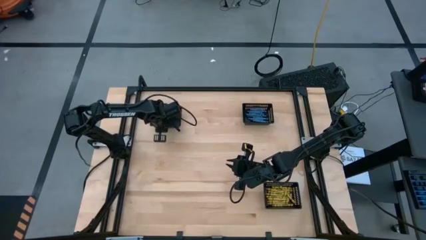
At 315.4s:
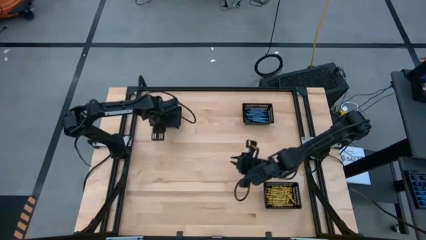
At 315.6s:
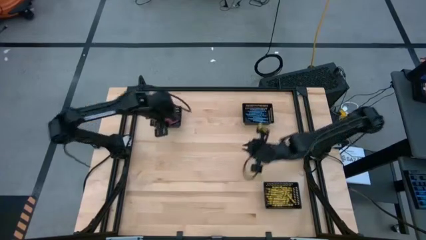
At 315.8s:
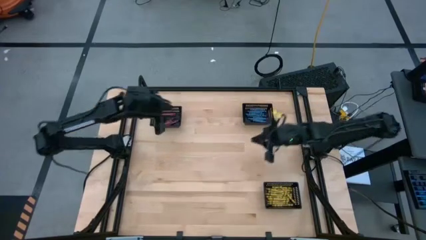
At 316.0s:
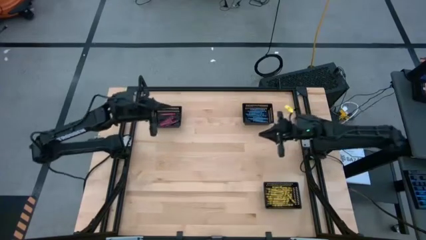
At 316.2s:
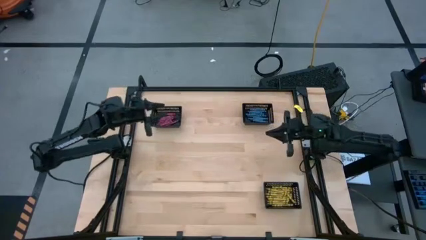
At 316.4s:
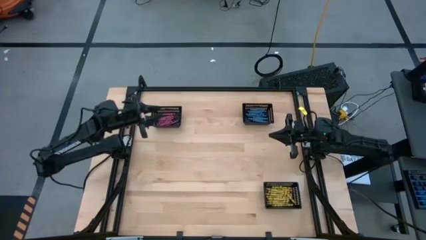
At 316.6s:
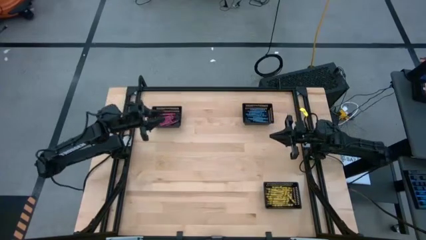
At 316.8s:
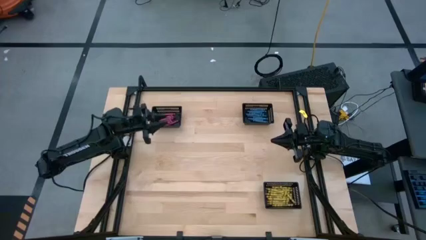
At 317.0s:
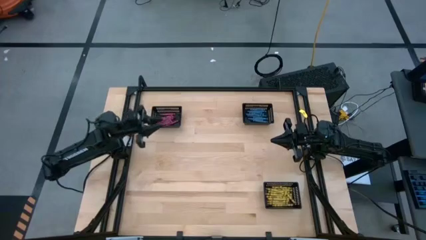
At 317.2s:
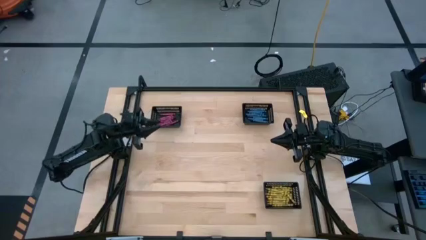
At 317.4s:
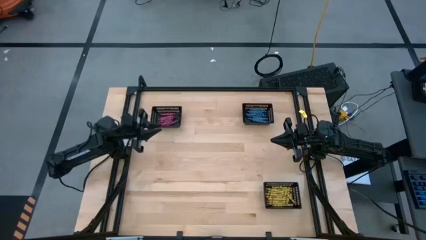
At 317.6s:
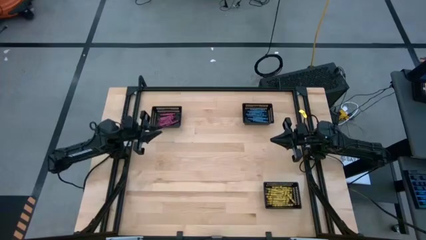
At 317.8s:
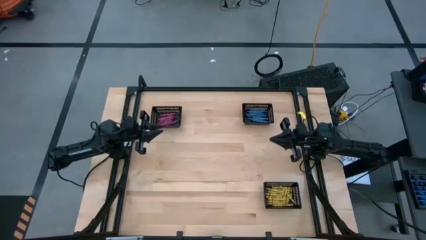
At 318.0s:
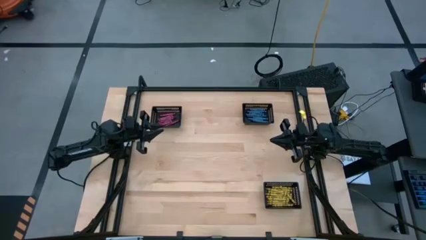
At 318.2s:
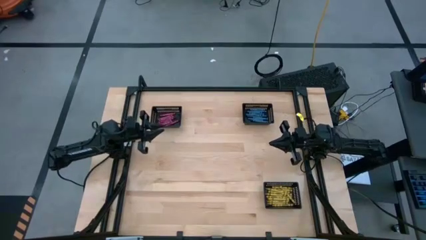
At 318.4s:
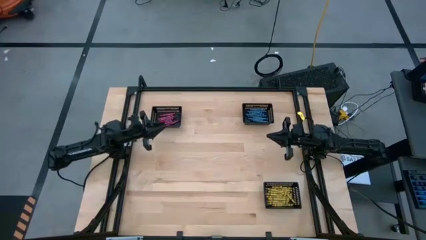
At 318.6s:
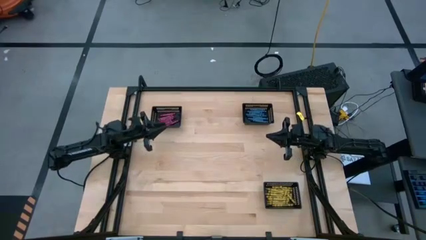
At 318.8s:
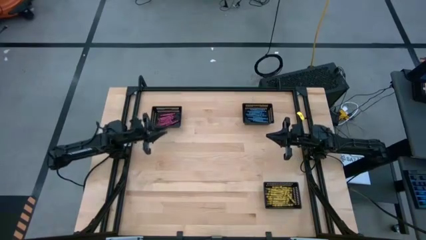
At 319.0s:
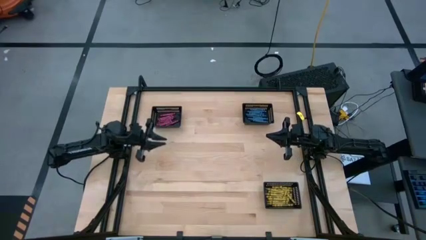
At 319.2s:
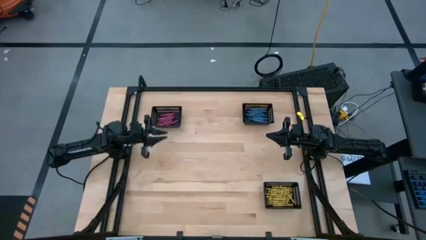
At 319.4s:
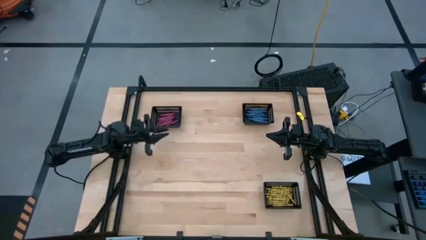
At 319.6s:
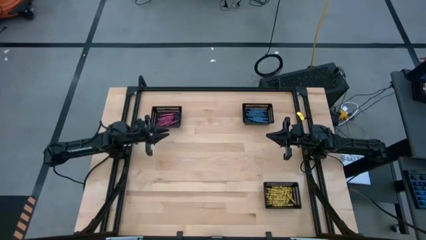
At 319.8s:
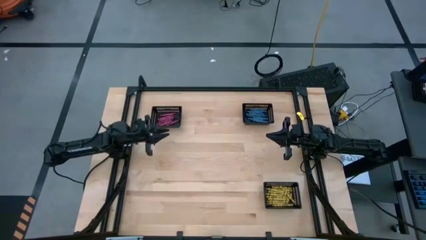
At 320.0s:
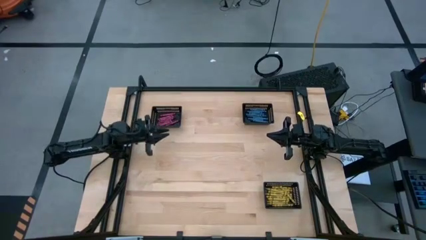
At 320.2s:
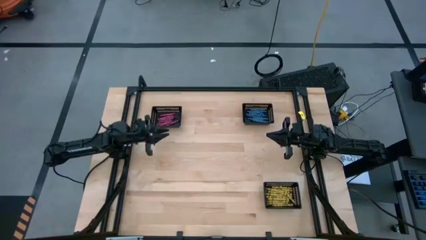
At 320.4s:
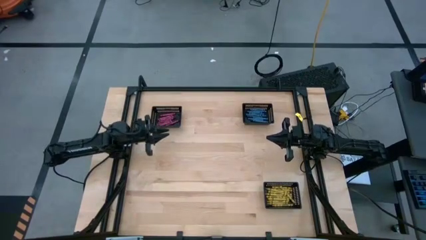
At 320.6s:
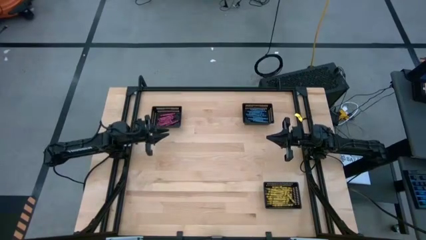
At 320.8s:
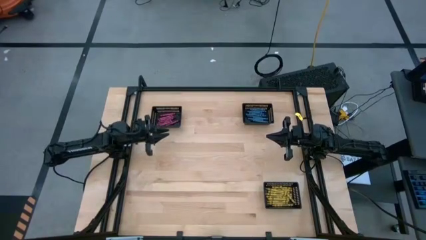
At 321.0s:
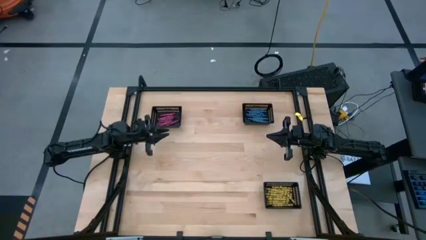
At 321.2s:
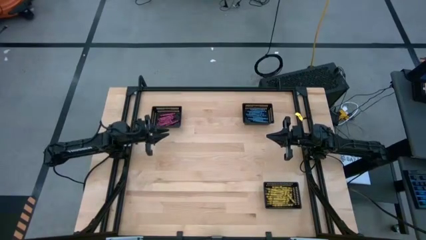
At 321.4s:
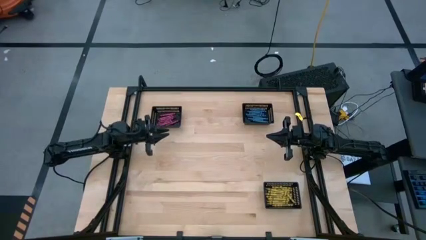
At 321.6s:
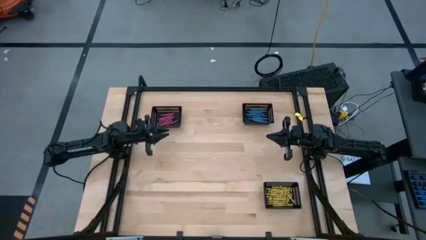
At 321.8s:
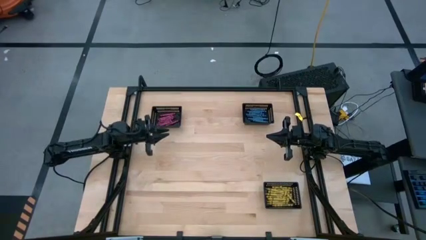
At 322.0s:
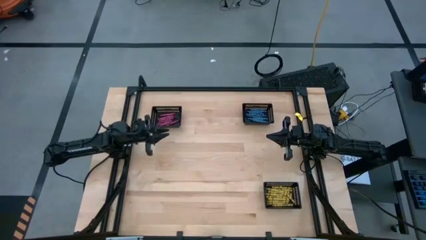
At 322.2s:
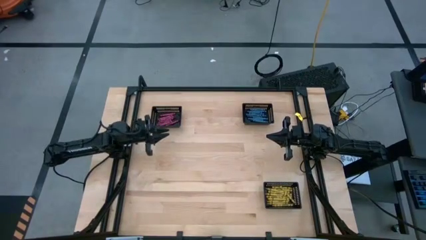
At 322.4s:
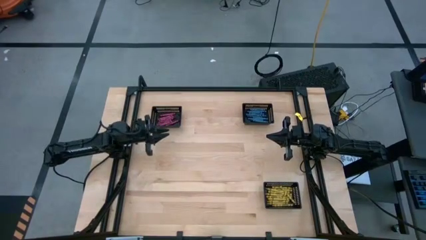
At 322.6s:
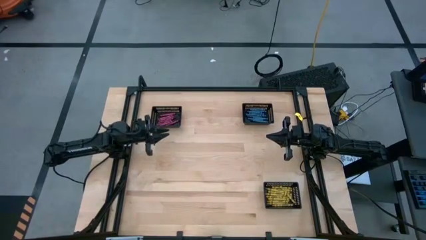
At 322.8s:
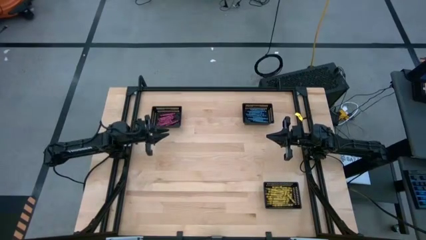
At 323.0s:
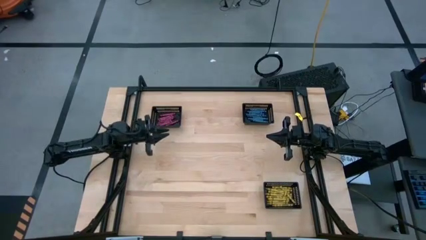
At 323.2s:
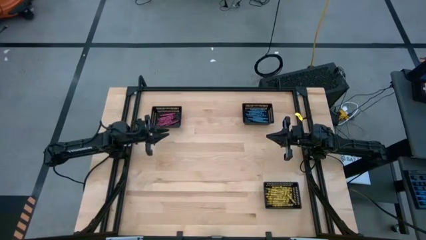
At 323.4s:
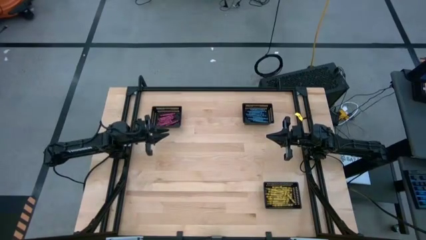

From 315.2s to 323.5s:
Task: Sort crayons
Return to Home Position

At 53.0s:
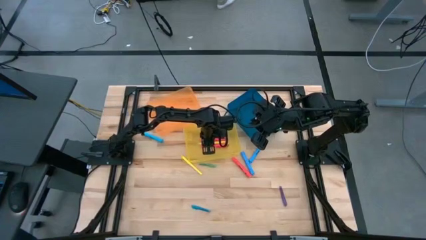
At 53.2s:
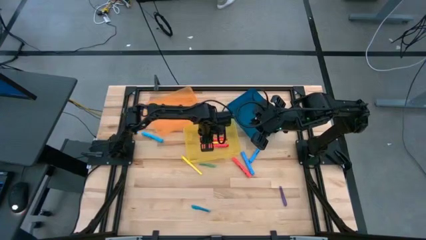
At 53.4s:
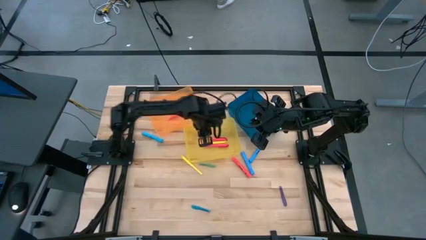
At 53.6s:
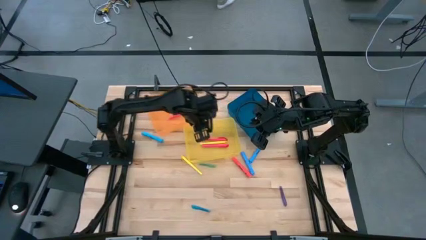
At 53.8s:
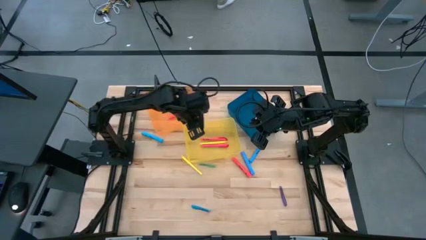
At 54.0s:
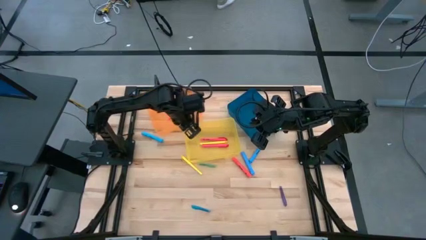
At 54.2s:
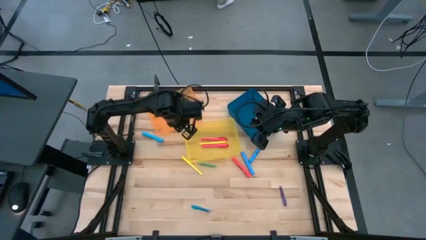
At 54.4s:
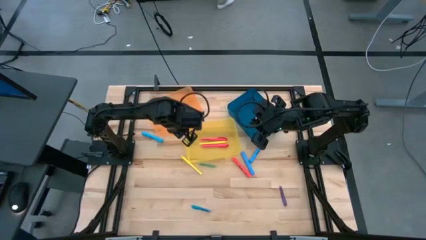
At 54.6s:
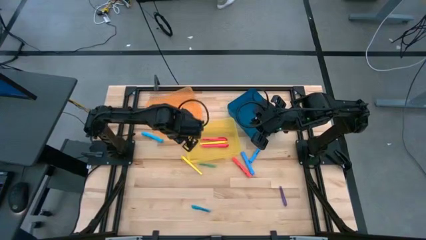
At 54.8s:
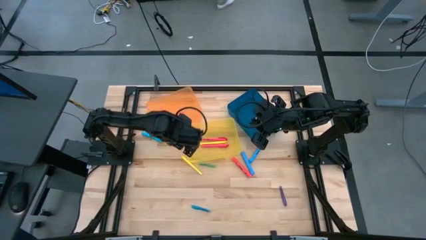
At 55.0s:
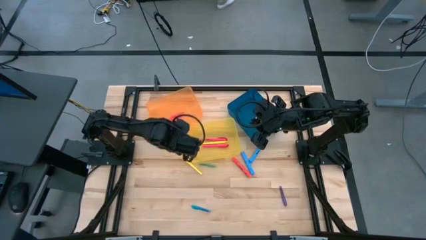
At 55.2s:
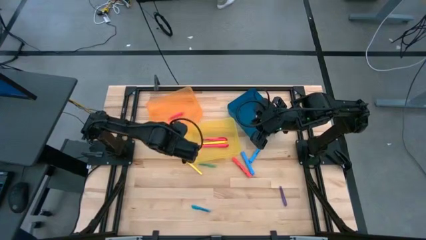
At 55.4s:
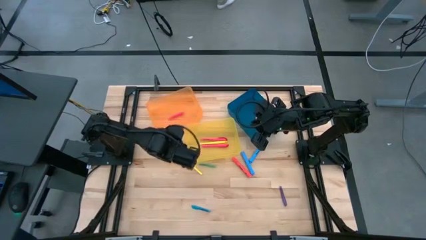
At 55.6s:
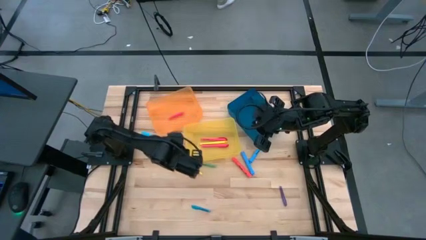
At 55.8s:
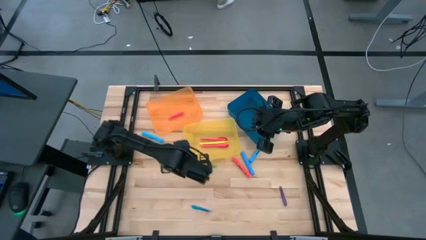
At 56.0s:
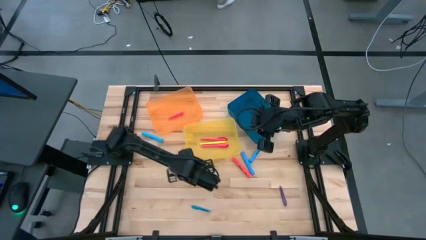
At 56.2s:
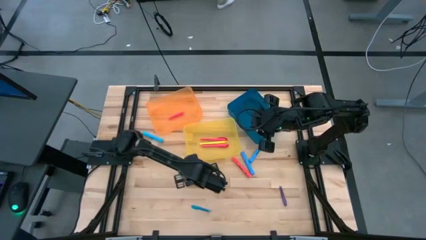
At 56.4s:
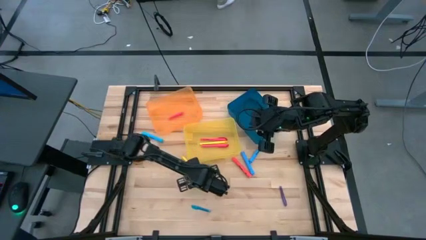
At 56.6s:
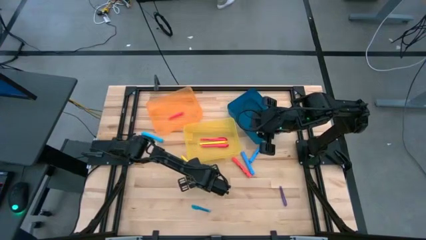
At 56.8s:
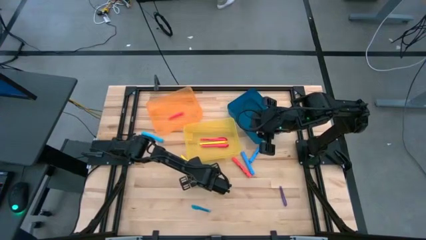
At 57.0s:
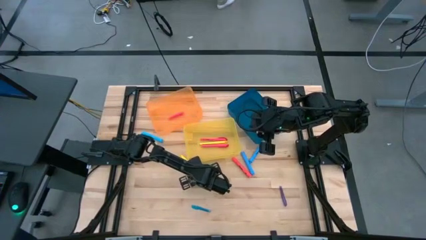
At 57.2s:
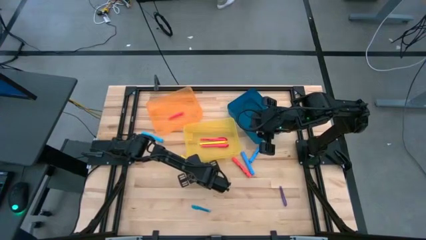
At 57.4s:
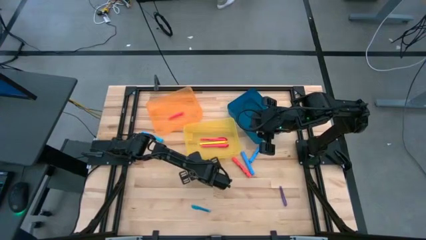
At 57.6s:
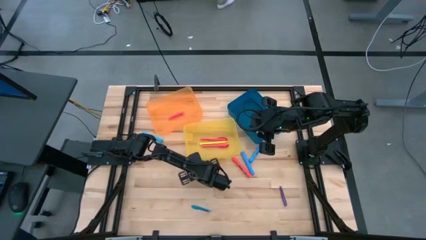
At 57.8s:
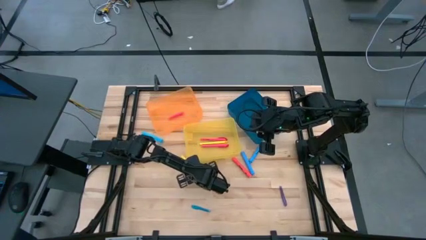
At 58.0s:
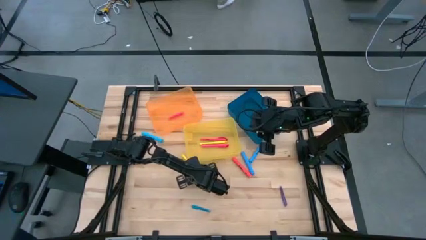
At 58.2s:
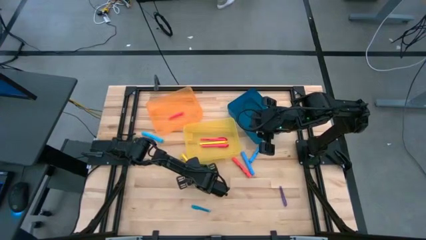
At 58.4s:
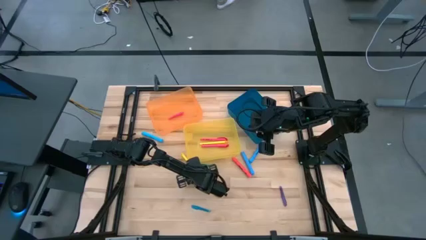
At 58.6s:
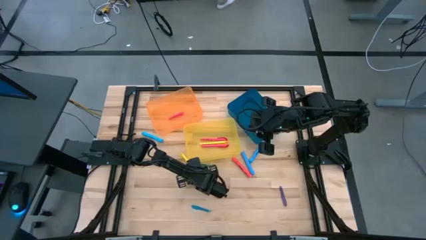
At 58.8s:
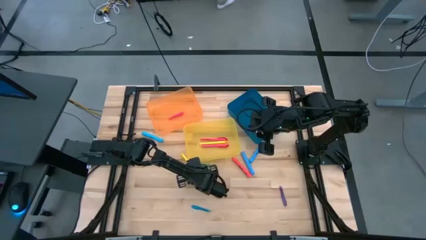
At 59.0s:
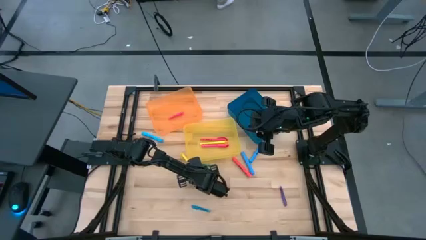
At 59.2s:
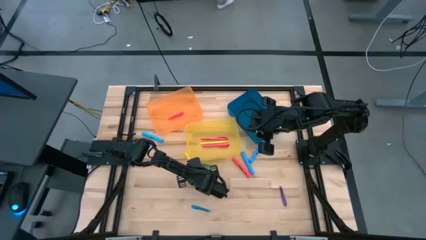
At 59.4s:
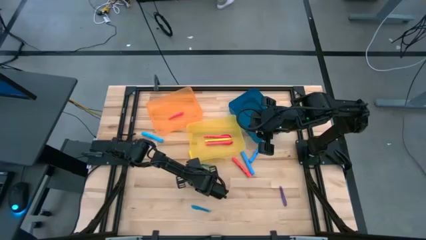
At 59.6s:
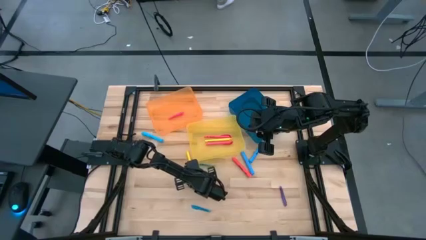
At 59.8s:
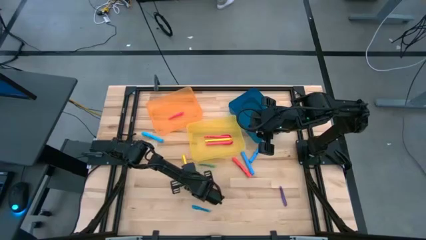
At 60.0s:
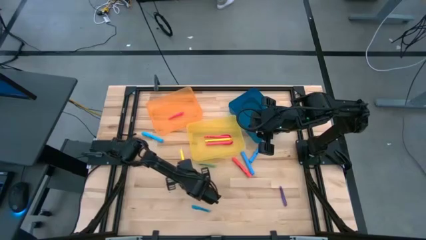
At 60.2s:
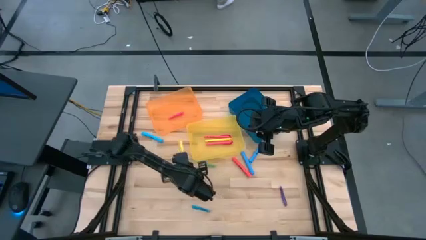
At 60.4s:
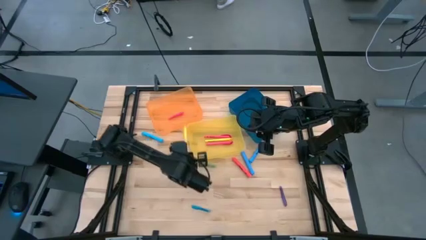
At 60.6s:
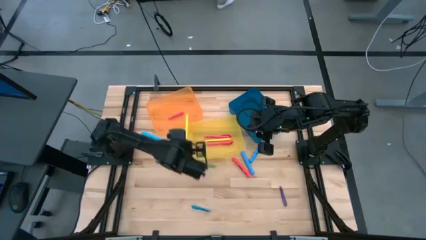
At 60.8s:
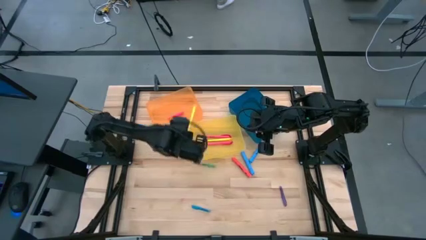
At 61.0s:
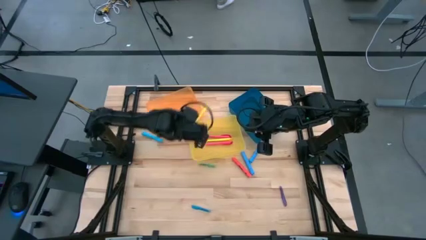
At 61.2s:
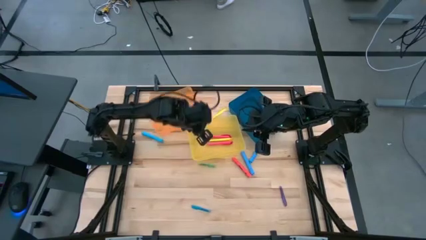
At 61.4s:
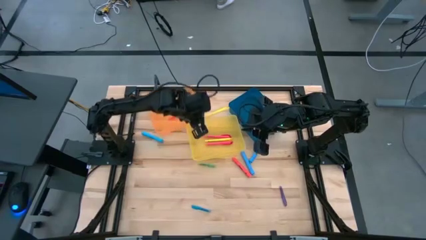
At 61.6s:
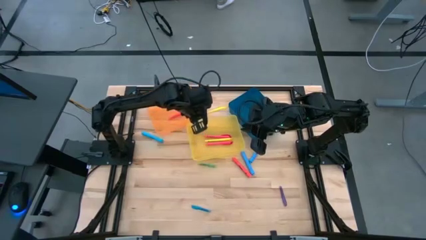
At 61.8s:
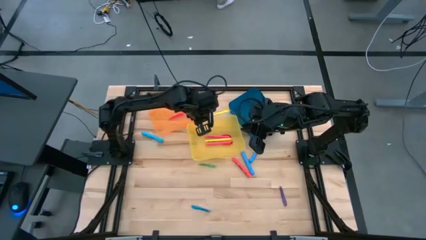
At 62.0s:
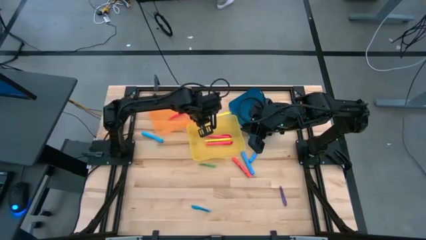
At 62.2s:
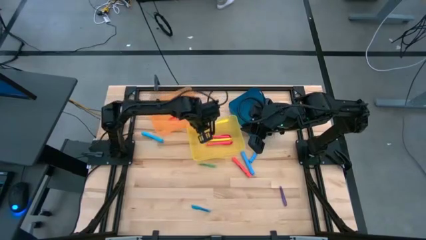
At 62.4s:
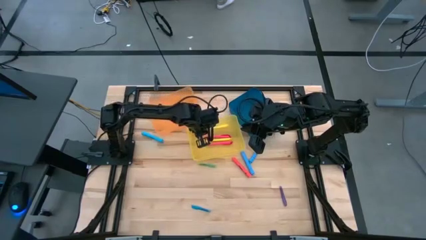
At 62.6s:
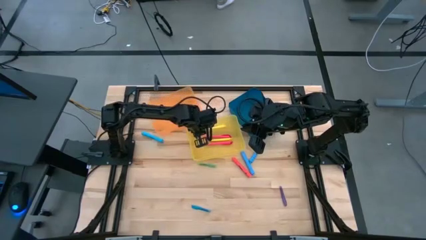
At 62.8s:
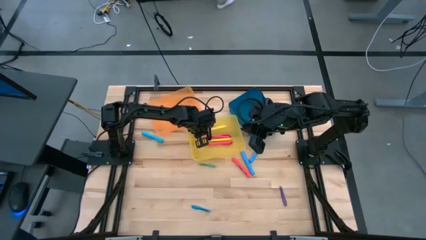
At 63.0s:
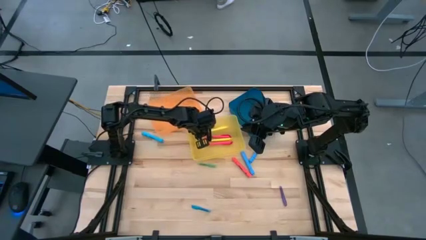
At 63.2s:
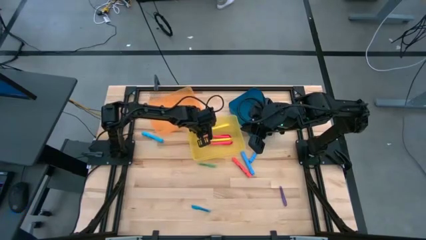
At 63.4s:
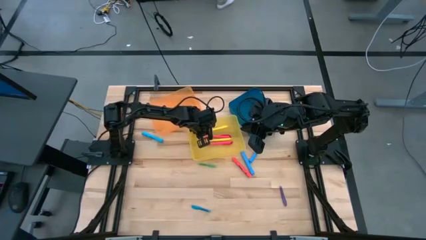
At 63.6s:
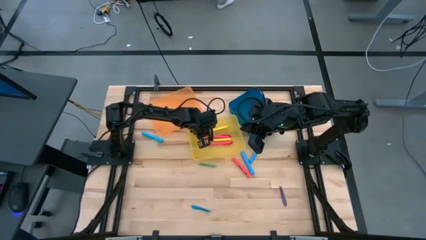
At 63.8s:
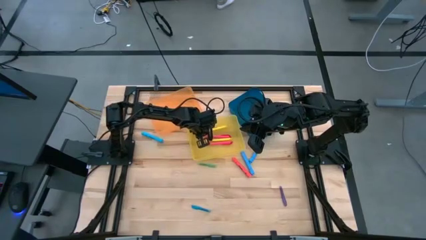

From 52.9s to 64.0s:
Task: Pick & Place Markers
Put the medium yellow highlighter pen into the yellow bin
